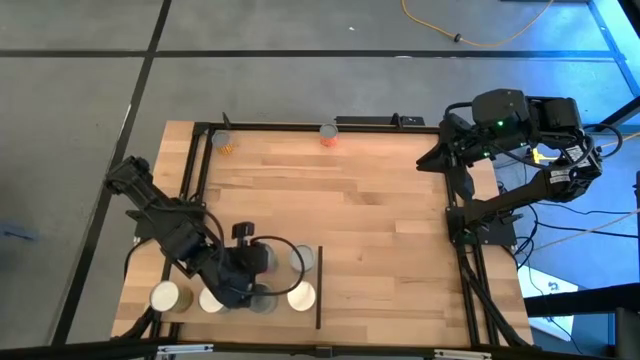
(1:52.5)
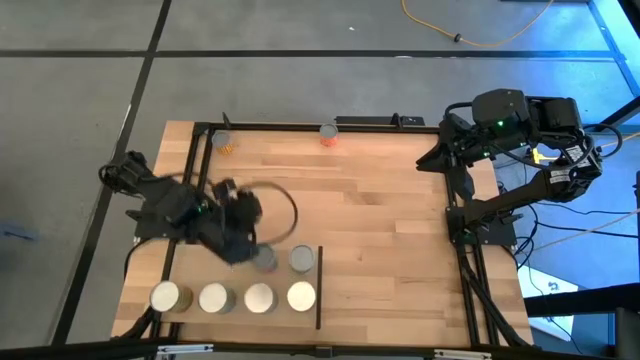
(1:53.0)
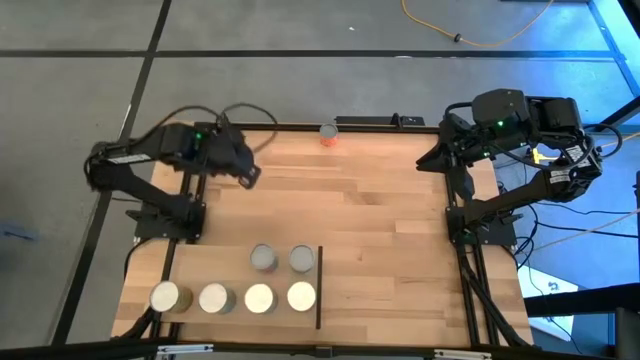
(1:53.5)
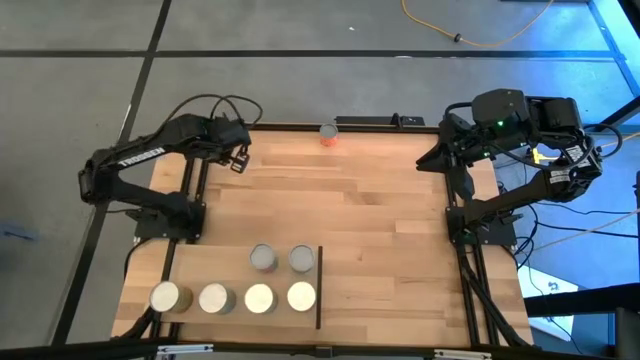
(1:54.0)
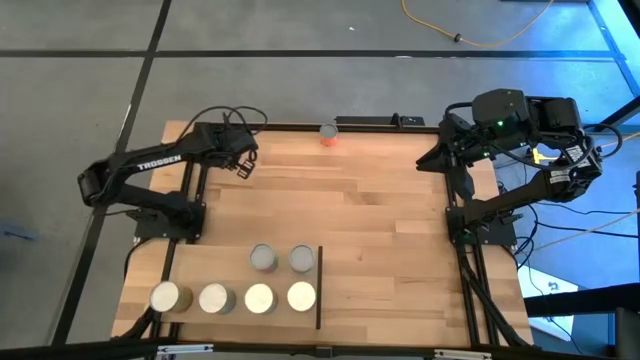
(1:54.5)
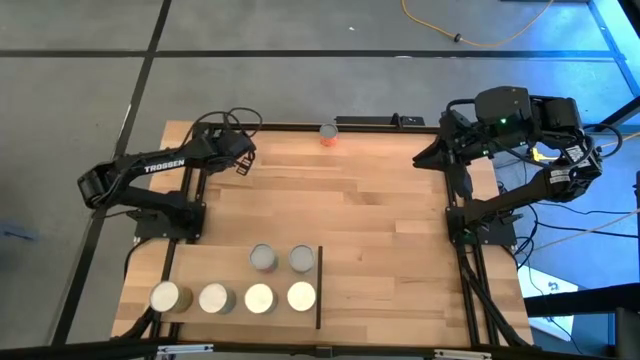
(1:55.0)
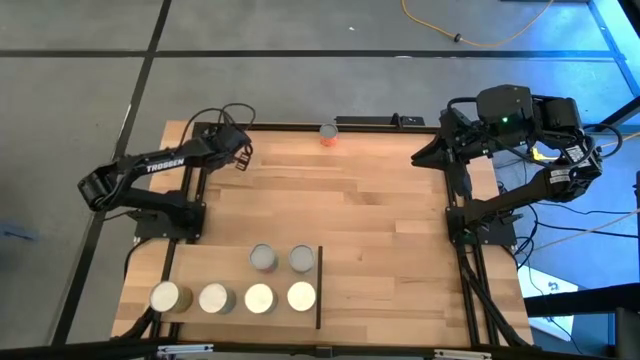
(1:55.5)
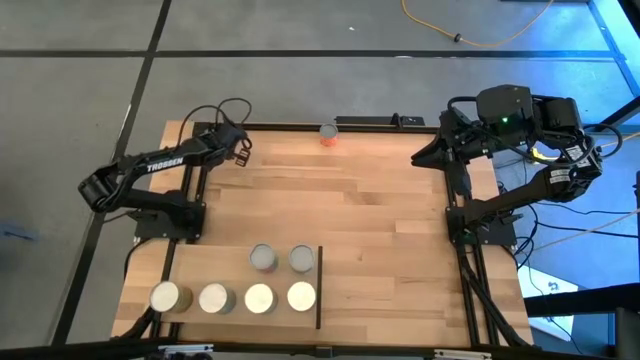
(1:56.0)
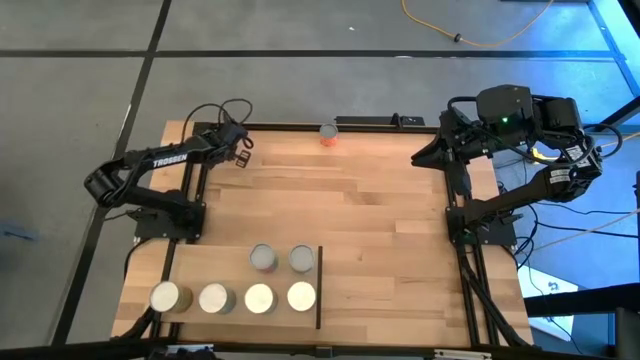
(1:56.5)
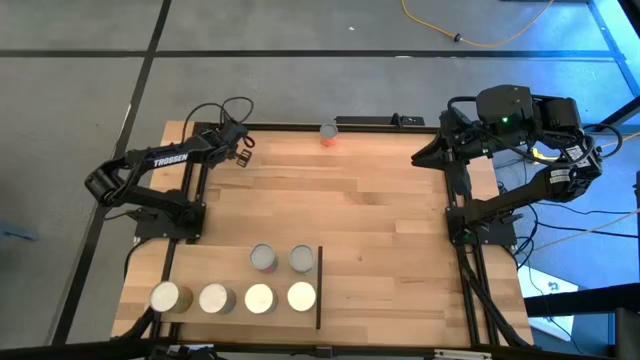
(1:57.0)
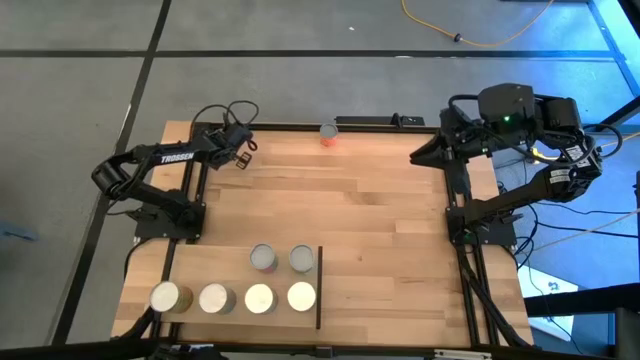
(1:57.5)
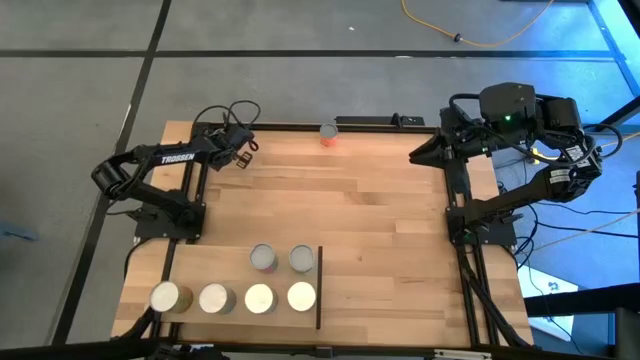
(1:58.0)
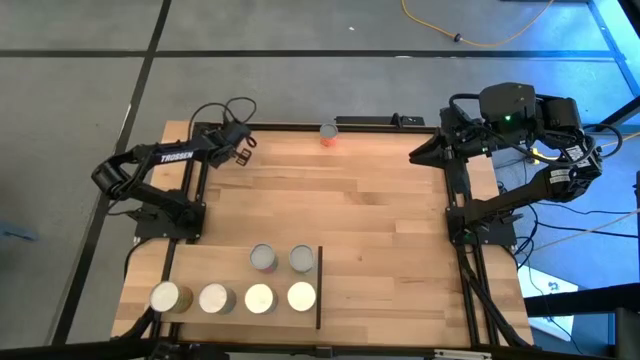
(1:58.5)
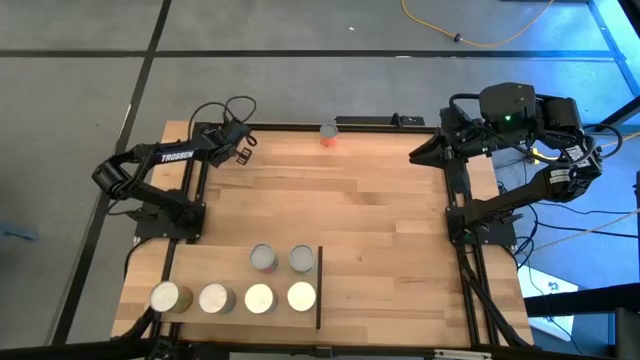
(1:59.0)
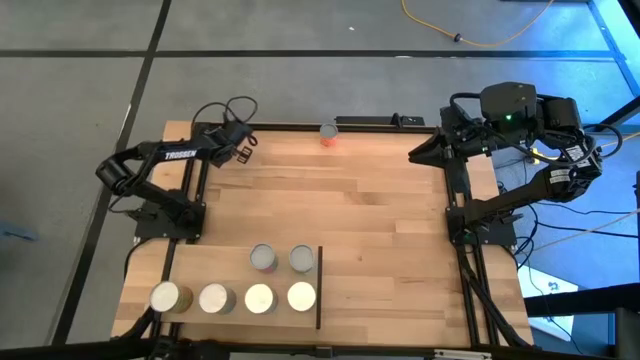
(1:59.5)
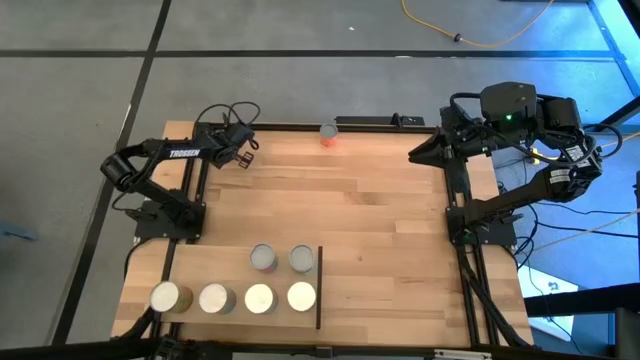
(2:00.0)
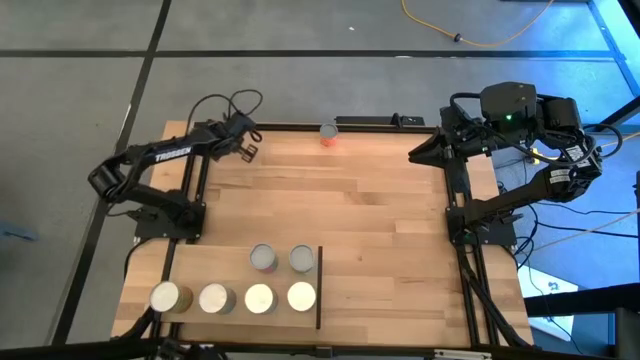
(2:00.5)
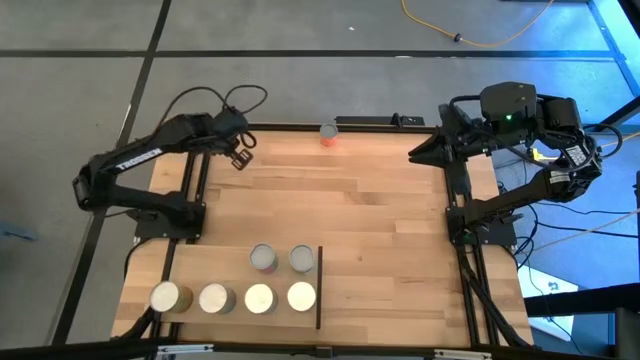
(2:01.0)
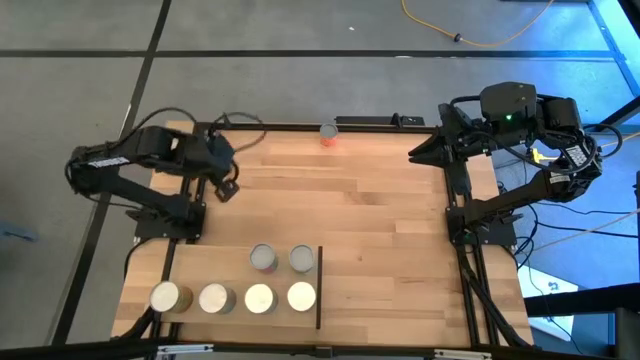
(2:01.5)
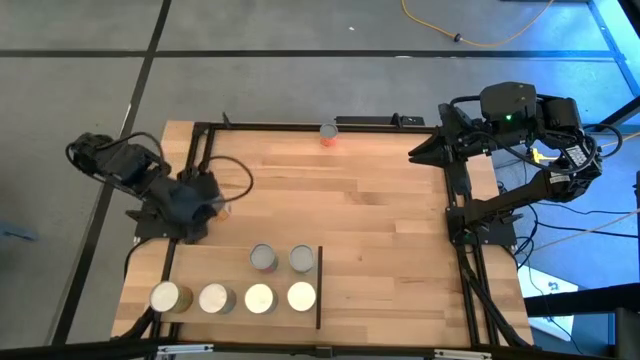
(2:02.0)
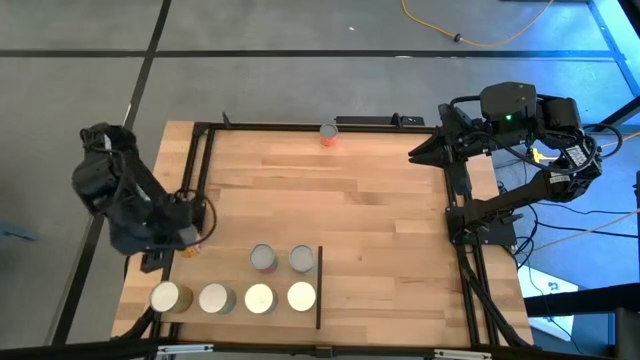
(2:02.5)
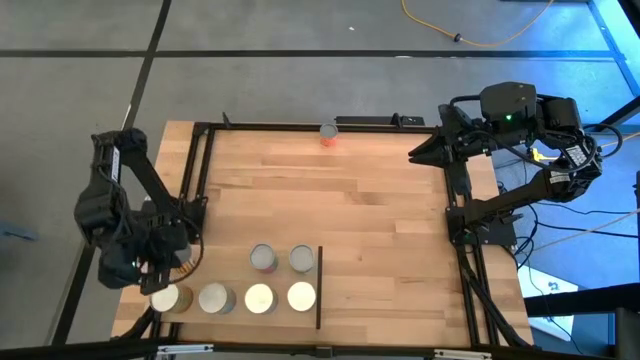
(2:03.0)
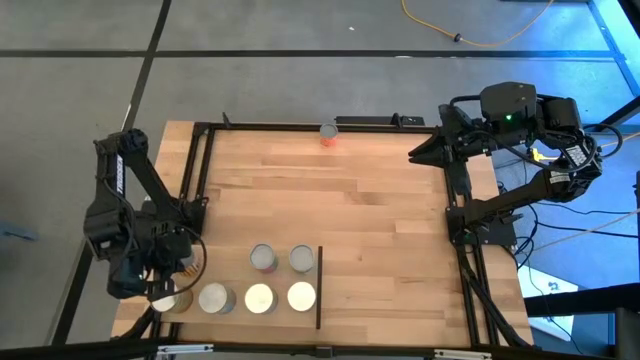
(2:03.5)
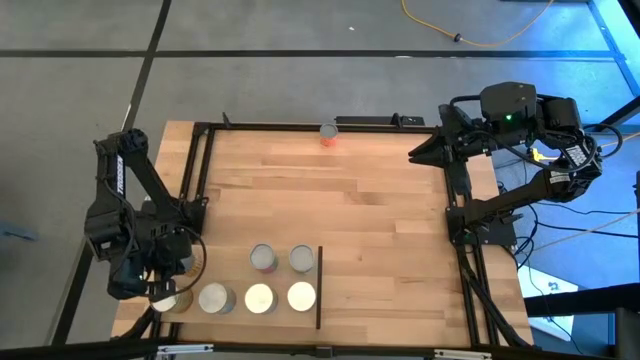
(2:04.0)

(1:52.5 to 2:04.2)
Task: Pick and place cans onto a shelf
Put the canned spicy black beans on the shelf

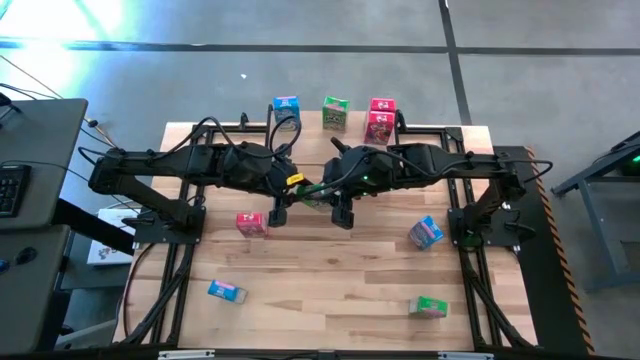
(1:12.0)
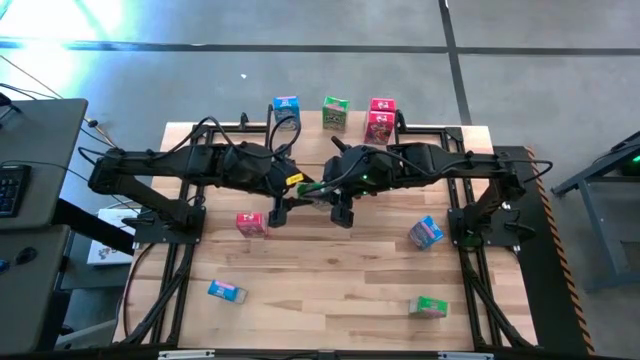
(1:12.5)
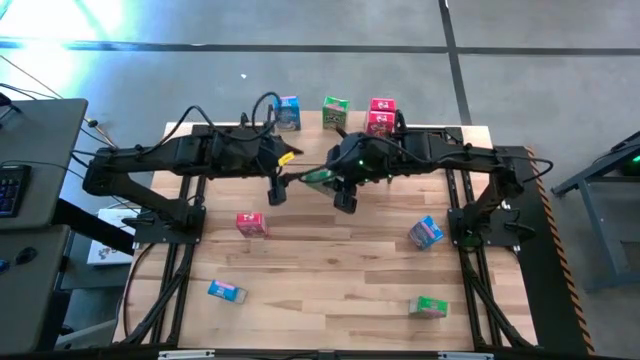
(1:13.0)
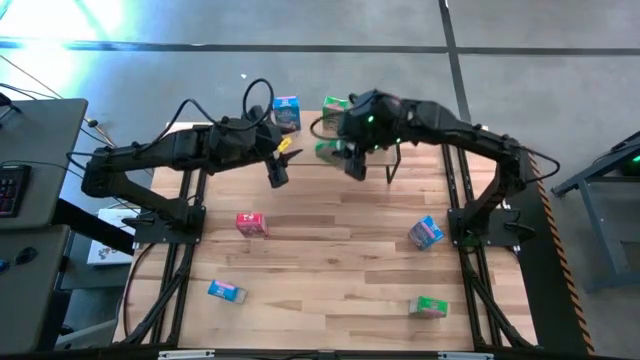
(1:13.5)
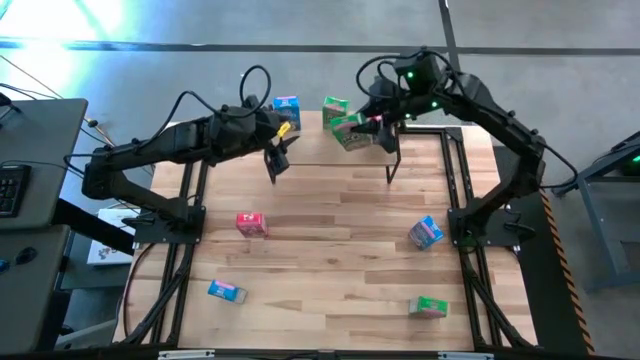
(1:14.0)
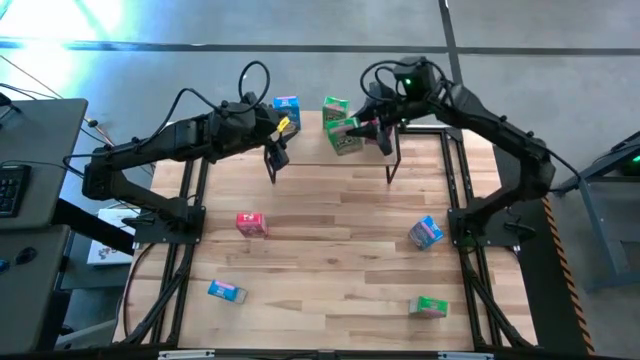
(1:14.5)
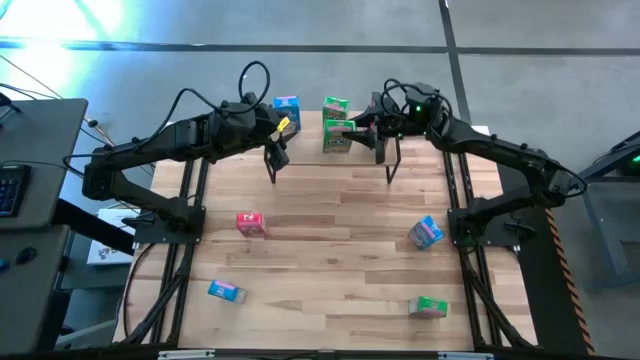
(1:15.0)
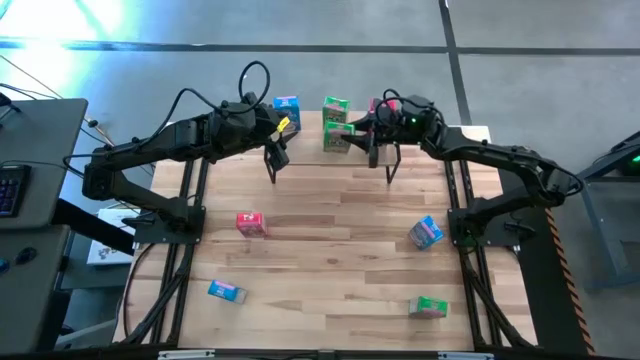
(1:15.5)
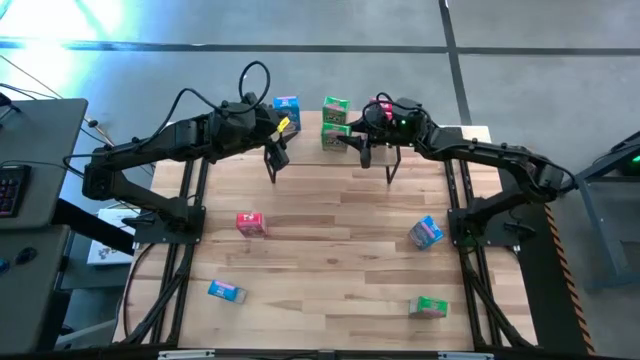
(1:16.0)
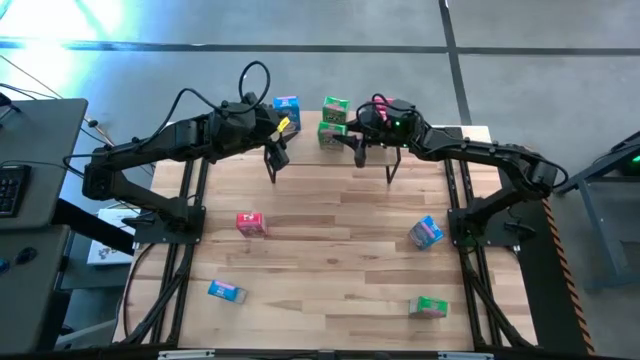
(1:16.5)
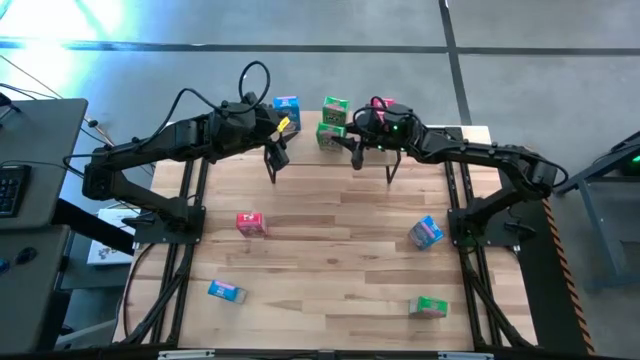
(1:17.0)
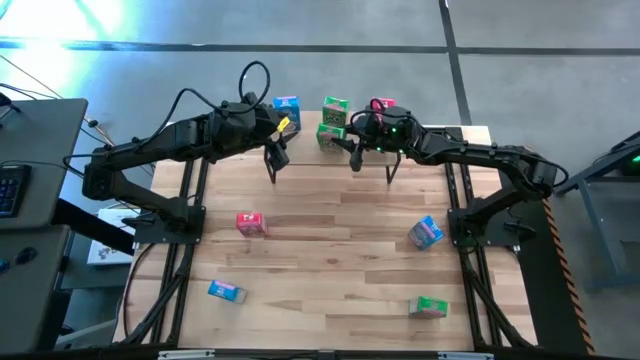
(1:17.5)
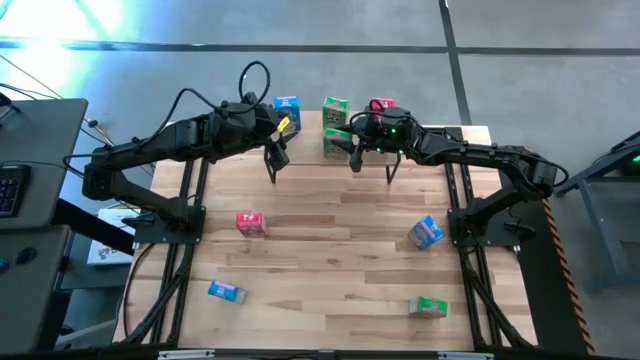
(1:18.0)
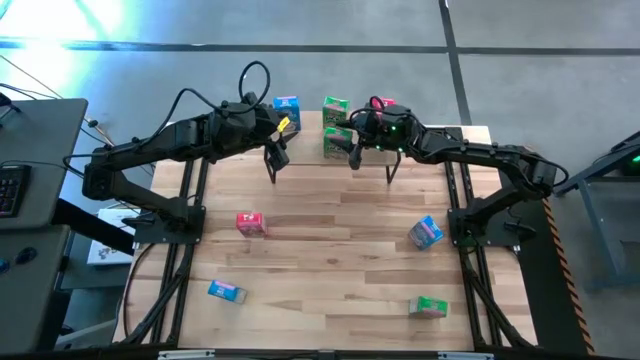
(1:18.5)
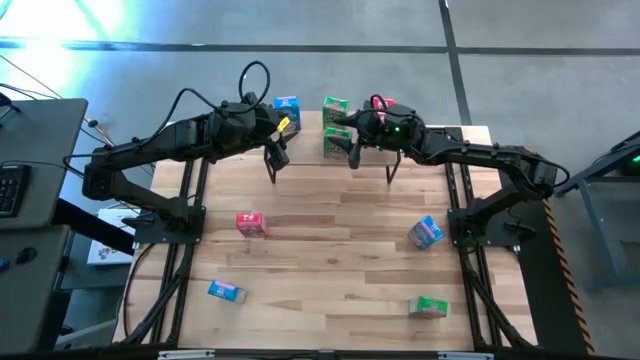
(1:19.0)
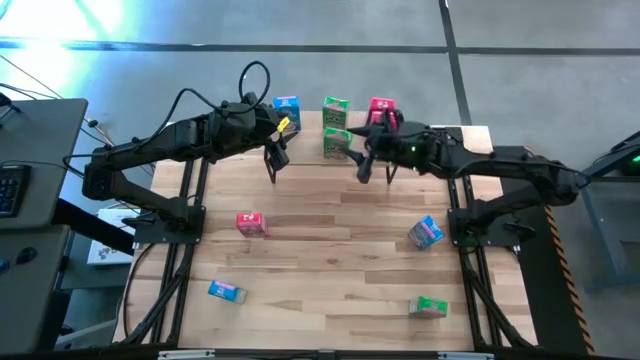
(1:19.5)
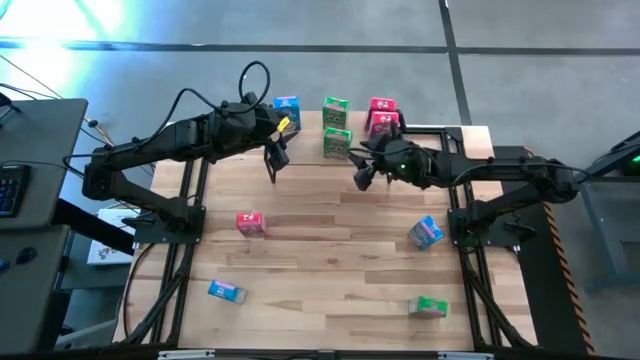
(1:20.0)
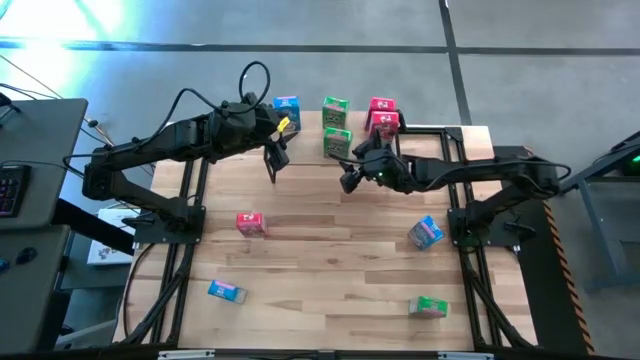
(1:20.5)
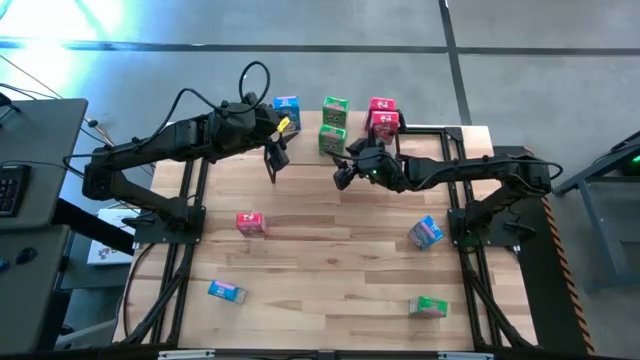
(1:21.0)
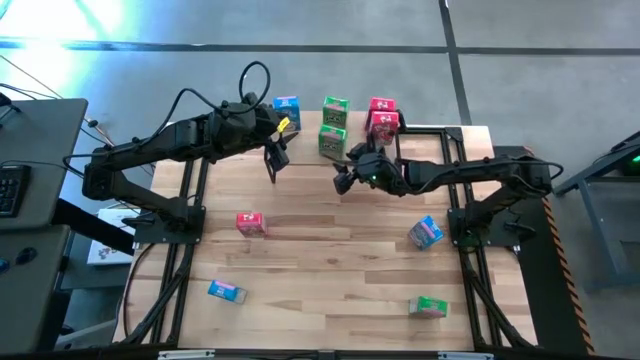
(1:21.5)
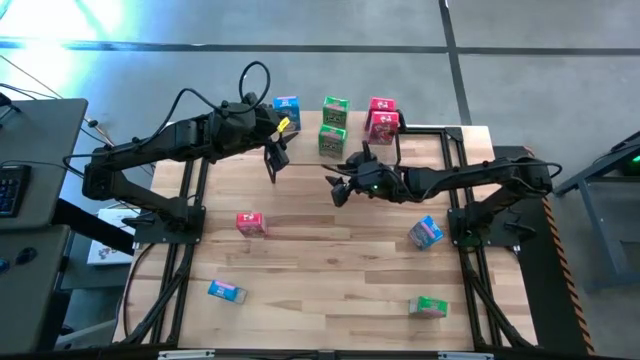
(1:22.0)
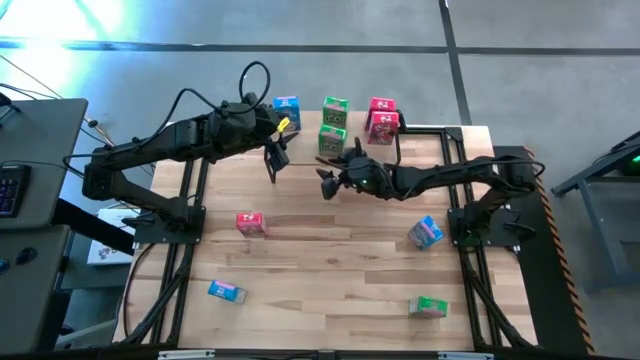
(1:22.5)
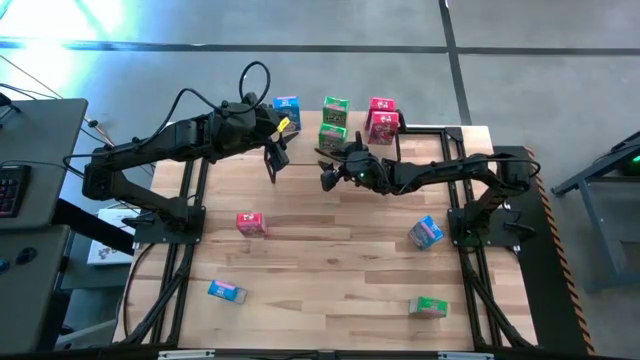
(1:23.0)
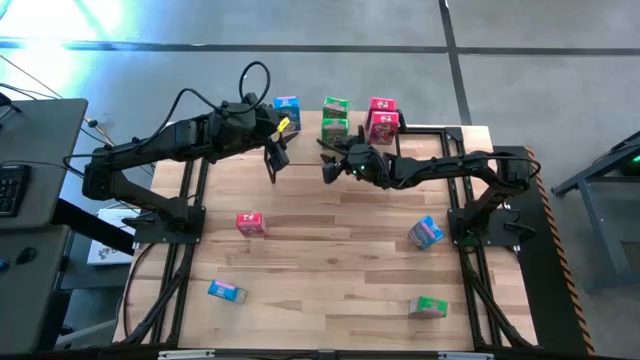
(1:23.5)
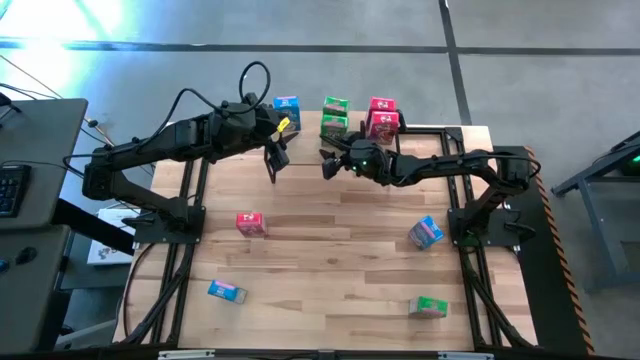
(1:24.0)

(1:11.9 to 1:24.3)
Task: Stack cereal on shelf
Put the top green cereal box aligned with the other green cereal box on the shelf
